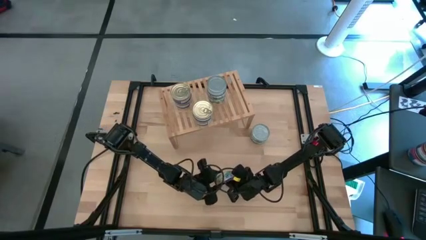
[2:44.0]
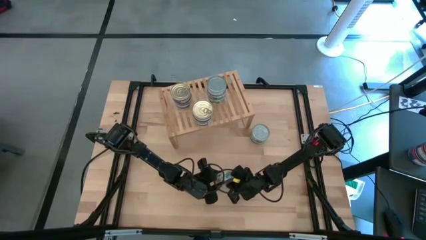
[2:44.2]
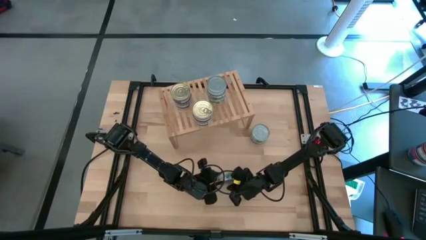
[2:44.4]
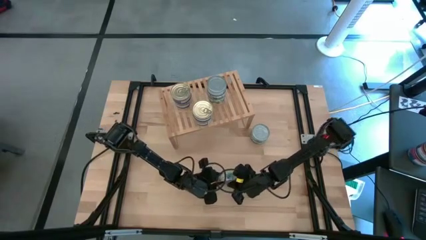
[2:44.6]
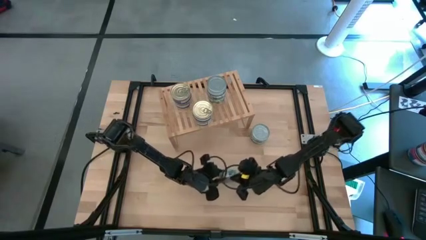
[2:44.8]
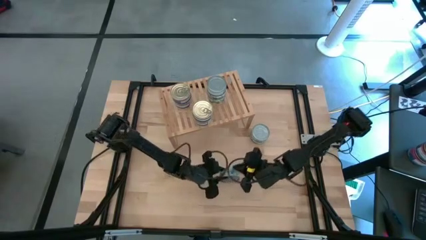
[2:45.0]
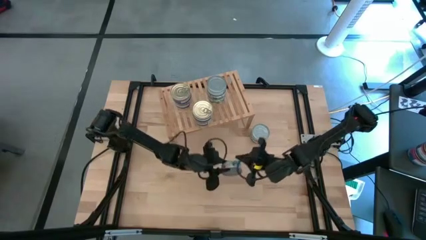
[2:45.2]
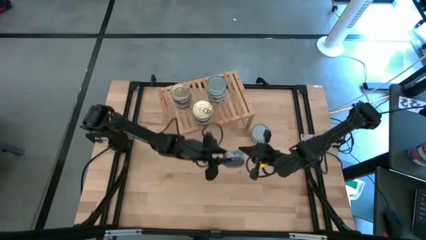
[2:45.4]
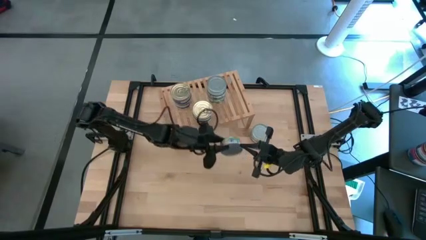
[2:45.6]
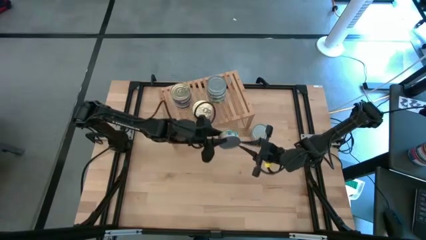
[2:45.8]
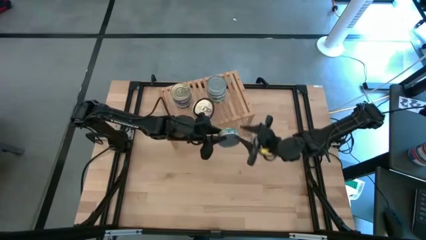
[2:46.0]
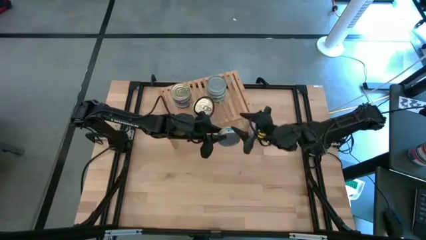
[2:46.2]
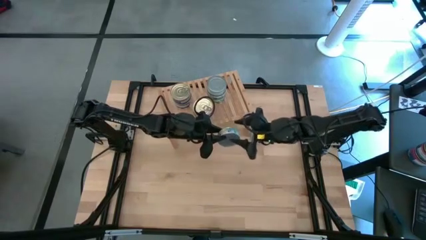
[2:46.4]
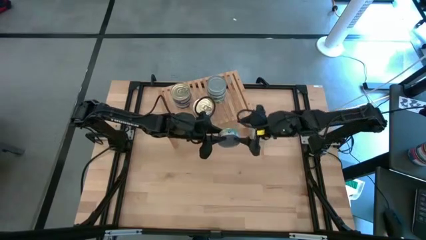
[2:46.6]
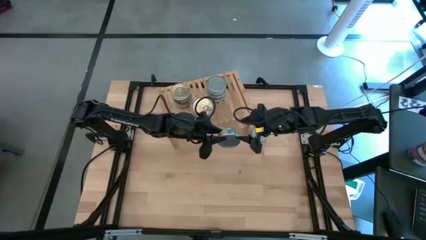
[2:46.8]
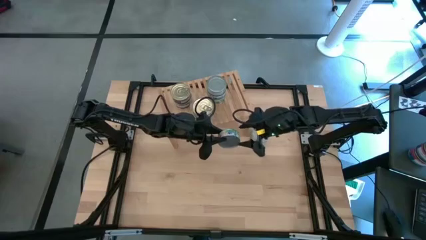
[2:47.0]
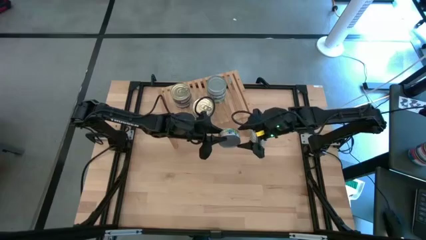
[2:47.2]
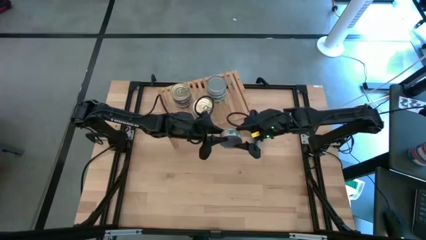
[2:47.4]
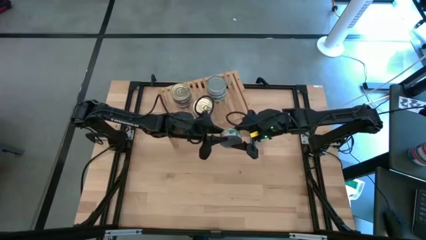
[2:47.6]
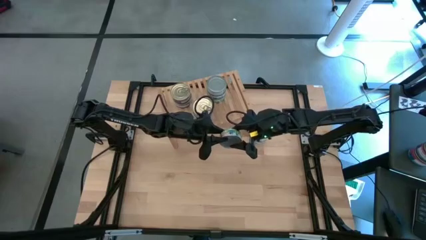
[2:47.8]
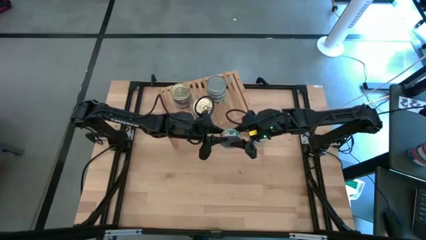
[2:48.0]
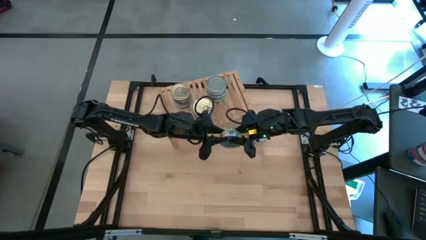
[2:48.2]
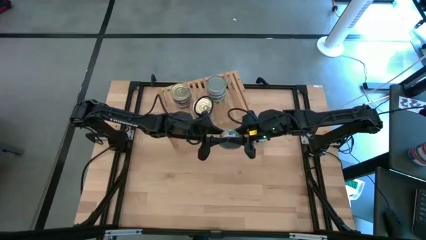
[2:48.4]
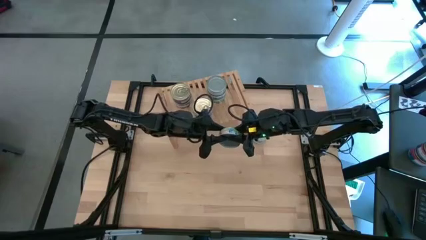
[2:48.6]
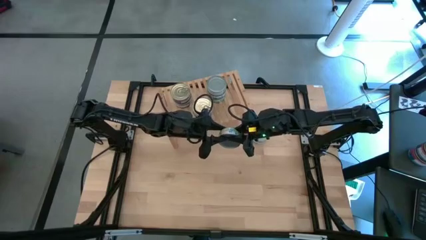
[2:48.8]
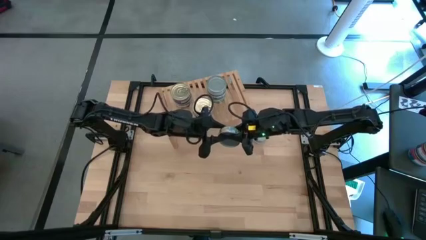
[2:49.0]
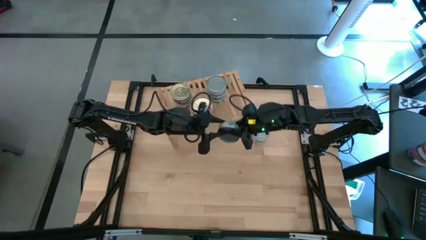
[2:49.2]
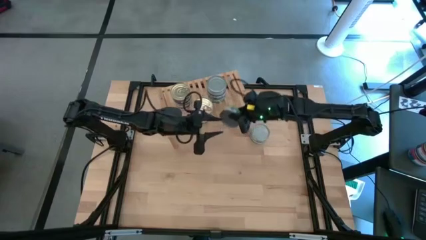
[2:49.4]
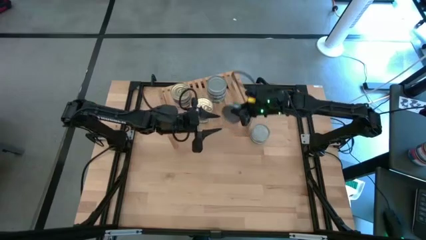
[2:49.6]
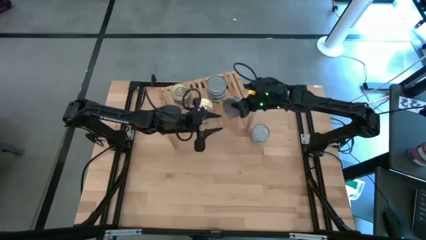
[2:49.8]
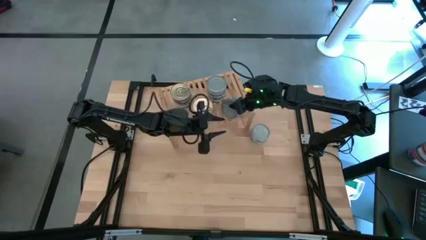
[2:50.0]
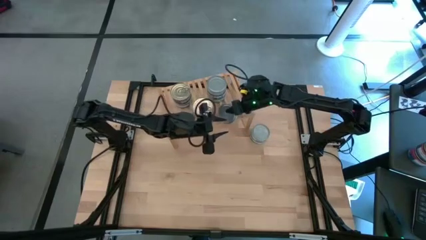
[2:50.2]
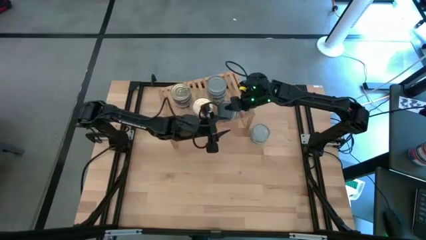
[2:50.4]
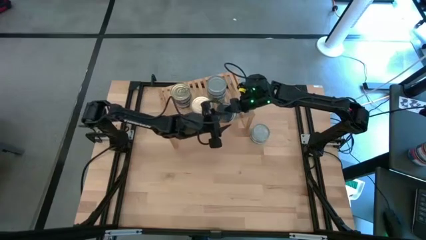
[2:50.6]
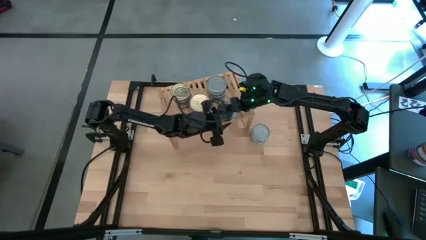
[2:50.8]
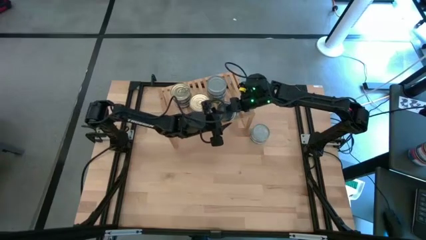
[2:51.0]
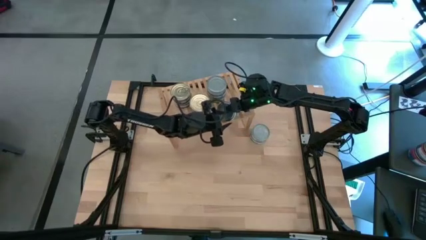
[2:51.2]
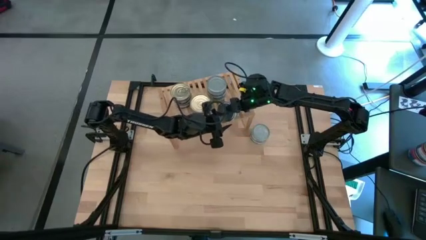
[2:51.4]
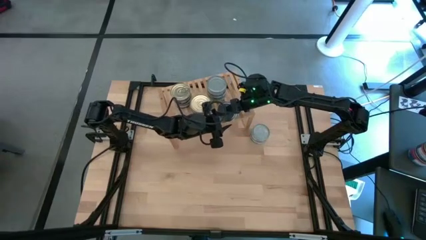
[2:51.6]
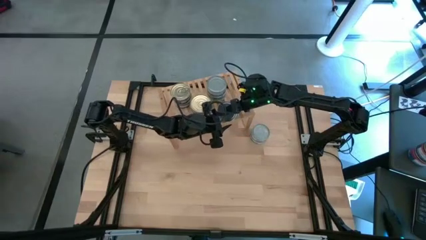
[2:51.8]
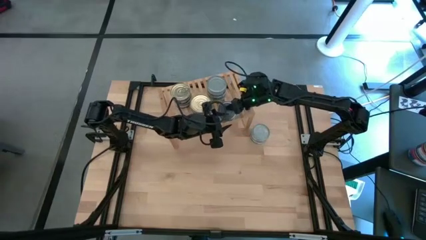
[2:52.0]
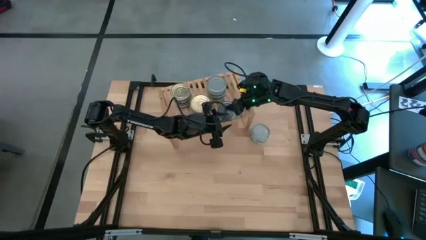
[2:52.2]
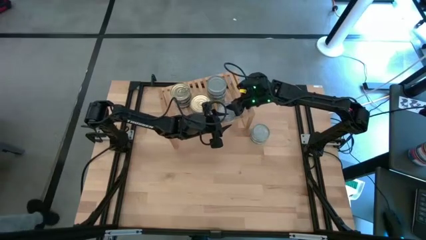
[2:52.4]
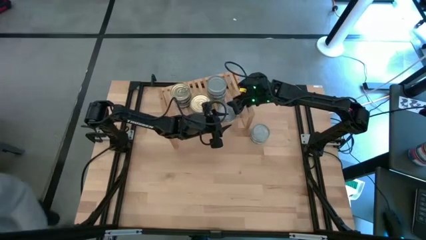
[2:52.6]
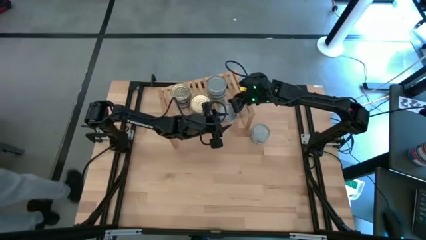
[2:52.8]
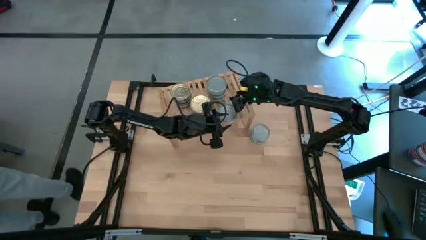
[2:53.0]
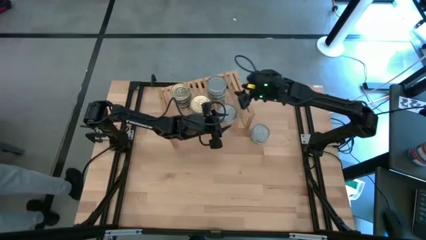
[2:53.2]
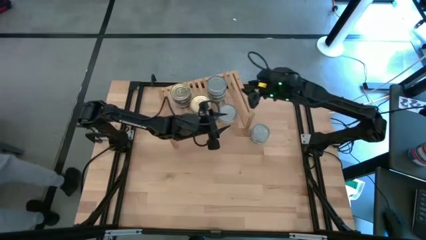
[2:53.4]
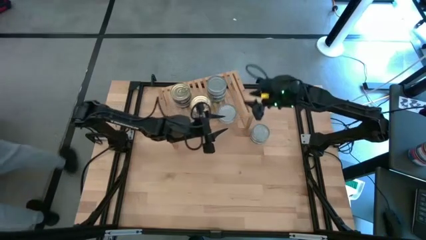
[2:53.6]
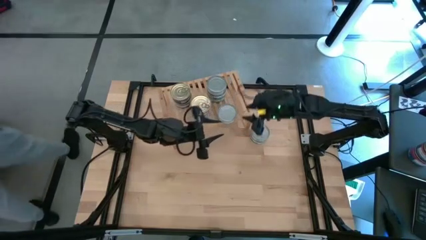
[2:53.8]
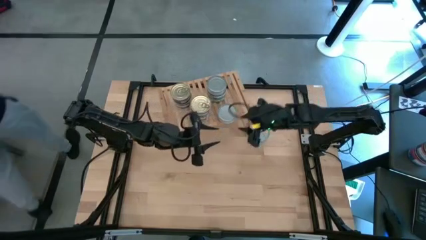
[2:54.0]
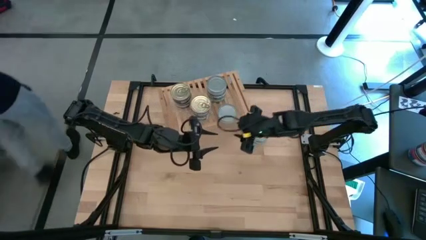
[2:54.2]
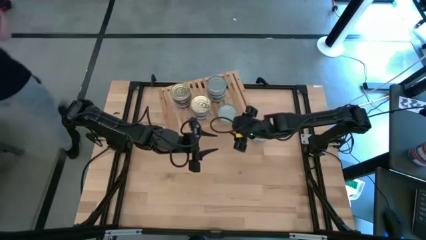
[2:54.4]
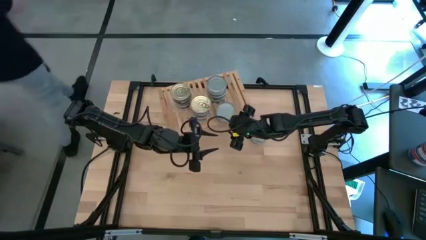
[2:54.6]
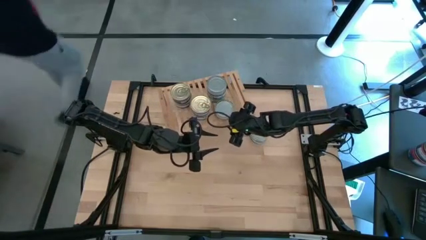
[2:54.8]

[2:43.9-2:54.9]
Task: Stack canned seafood by type on shelf
Put the green tuna can on the shelf aligned with the other green tuna can
